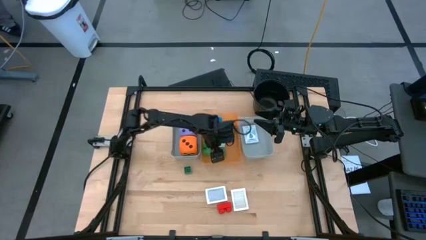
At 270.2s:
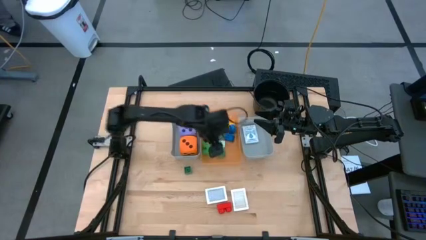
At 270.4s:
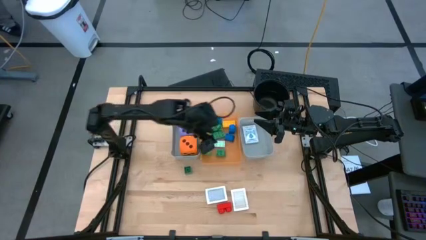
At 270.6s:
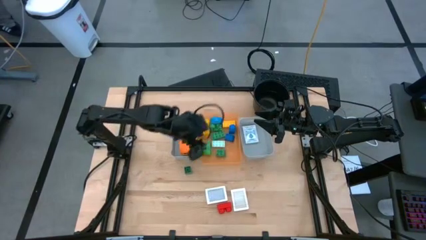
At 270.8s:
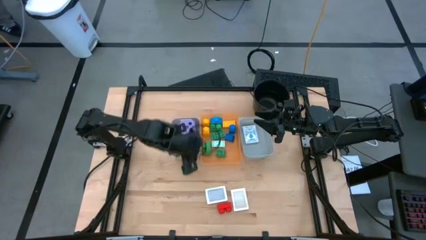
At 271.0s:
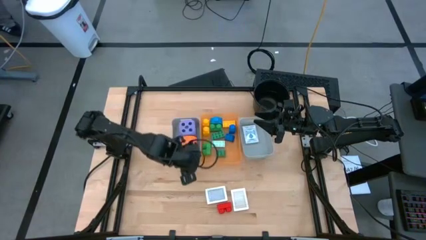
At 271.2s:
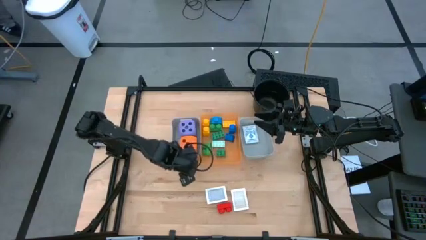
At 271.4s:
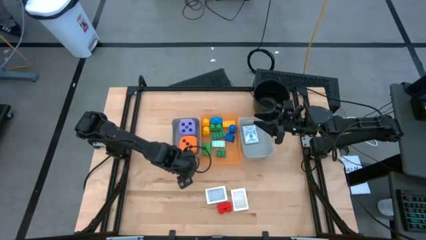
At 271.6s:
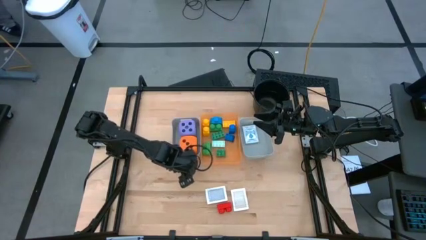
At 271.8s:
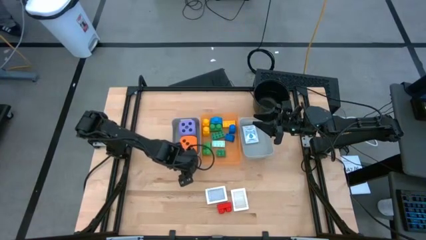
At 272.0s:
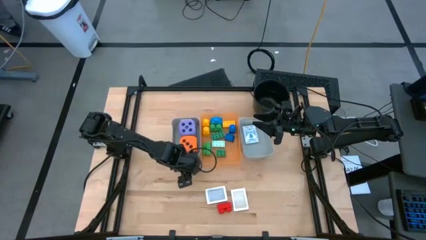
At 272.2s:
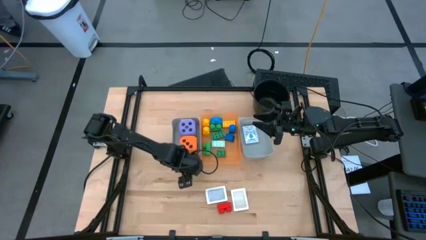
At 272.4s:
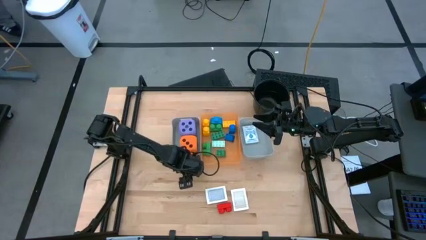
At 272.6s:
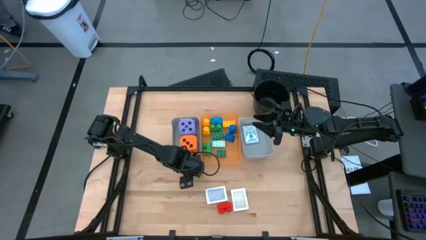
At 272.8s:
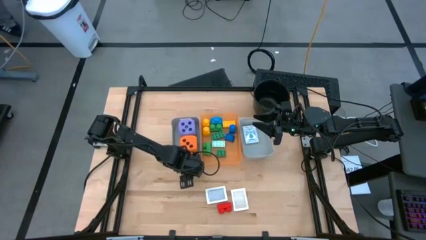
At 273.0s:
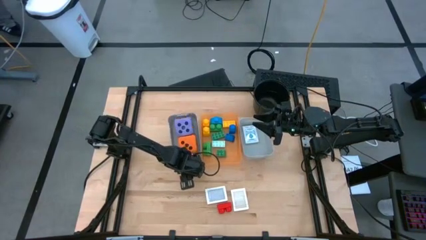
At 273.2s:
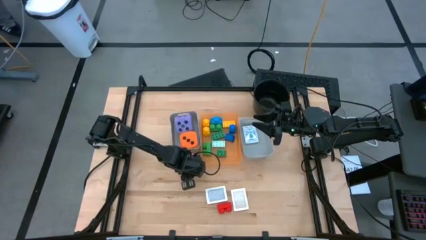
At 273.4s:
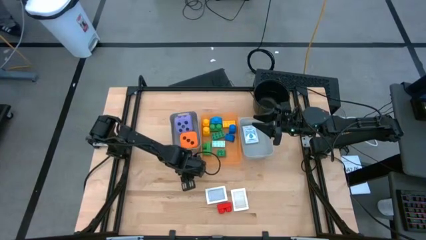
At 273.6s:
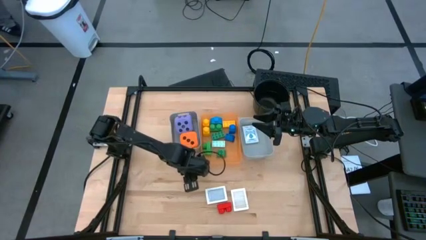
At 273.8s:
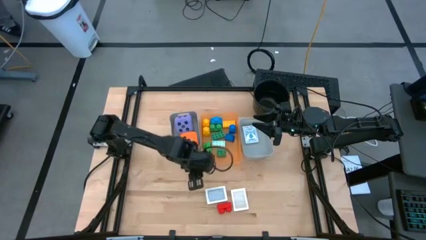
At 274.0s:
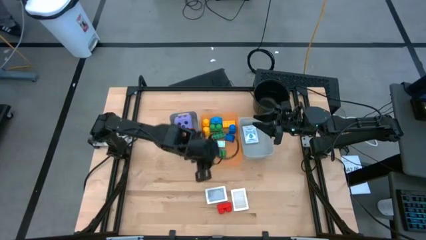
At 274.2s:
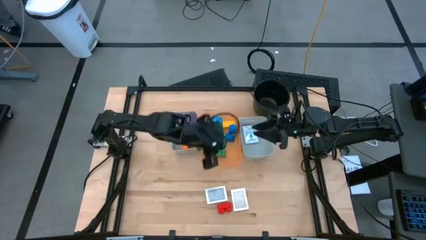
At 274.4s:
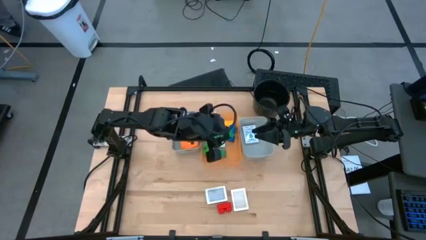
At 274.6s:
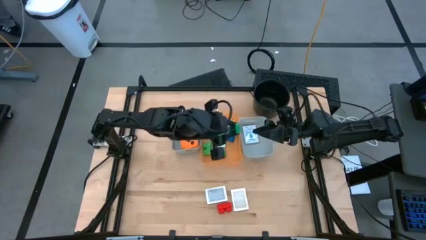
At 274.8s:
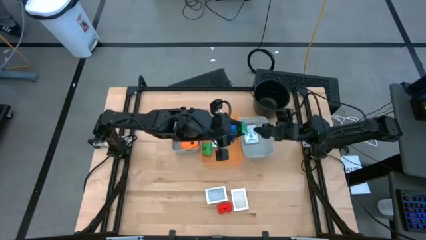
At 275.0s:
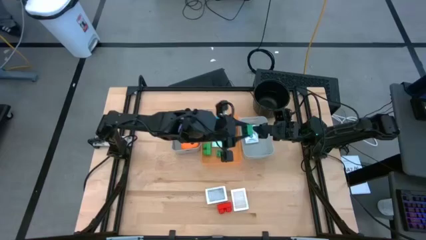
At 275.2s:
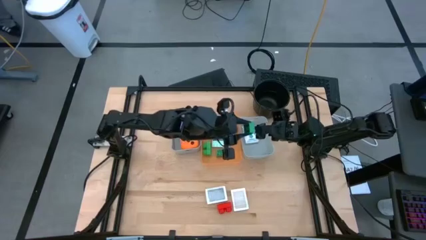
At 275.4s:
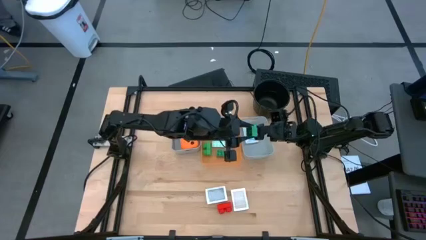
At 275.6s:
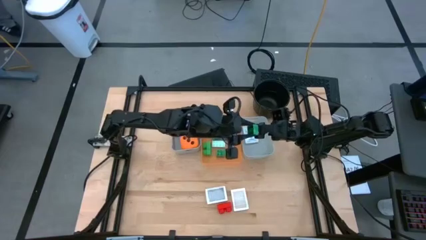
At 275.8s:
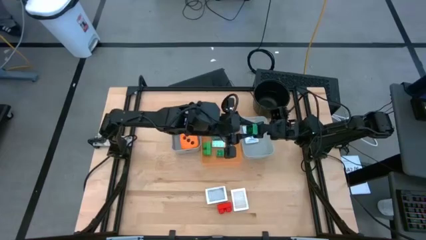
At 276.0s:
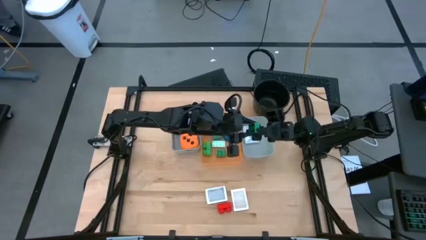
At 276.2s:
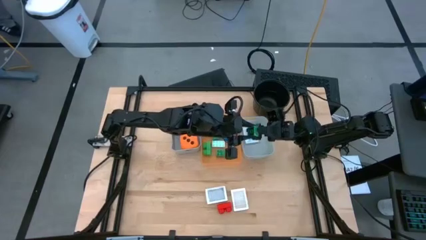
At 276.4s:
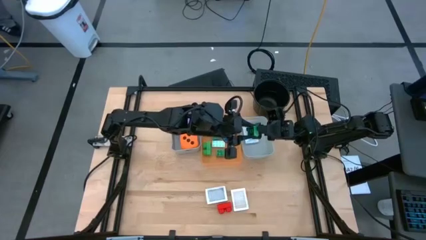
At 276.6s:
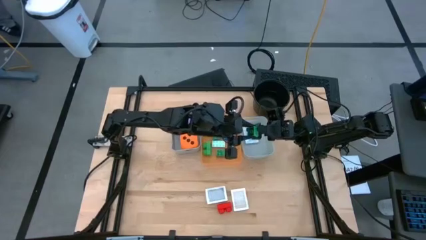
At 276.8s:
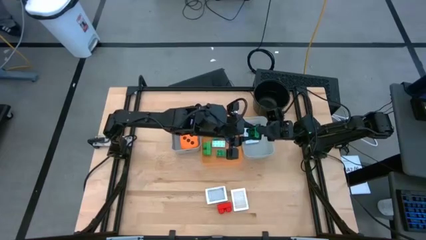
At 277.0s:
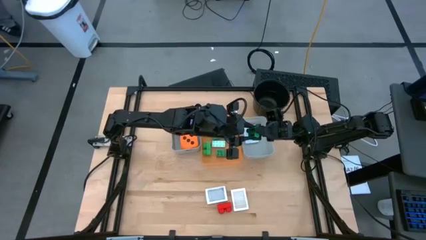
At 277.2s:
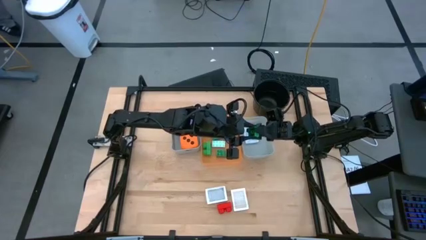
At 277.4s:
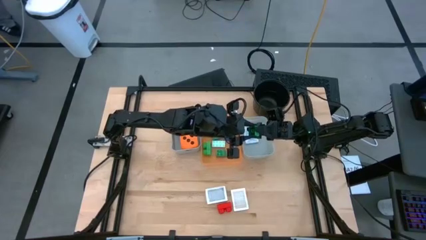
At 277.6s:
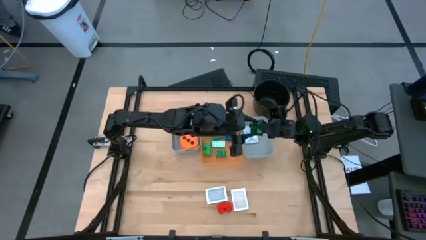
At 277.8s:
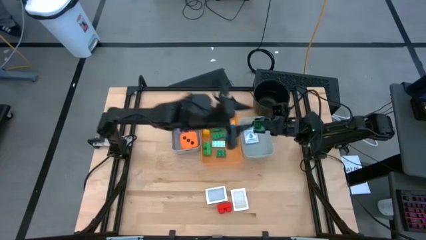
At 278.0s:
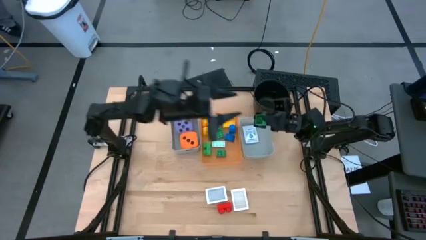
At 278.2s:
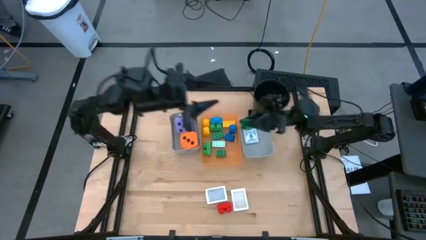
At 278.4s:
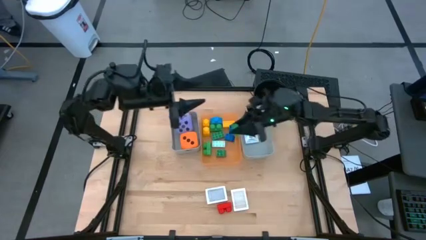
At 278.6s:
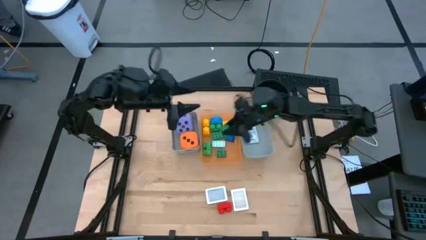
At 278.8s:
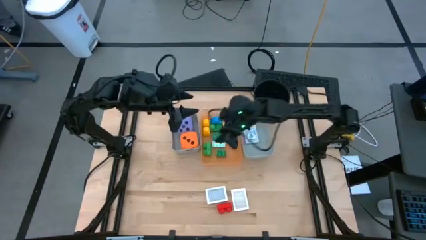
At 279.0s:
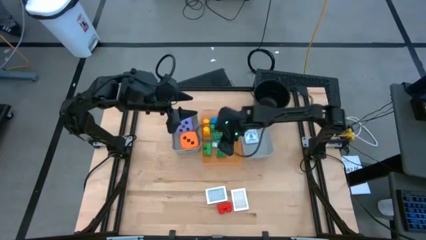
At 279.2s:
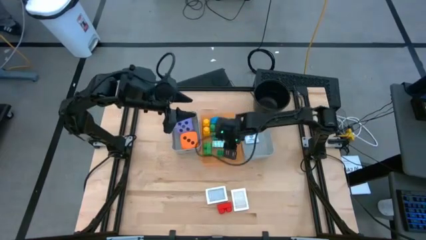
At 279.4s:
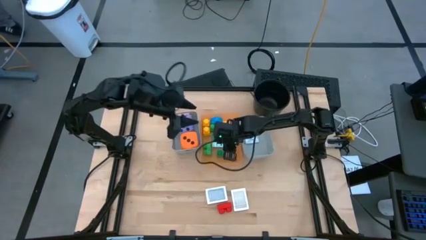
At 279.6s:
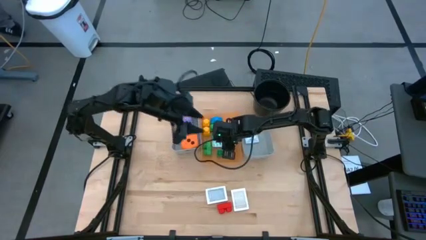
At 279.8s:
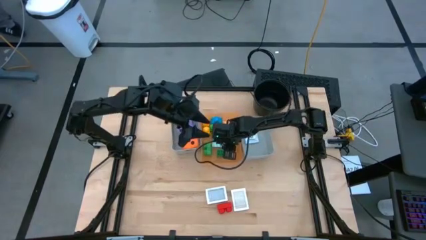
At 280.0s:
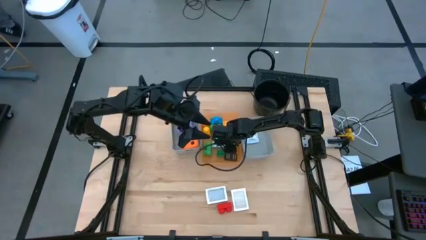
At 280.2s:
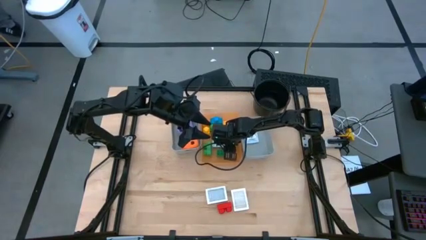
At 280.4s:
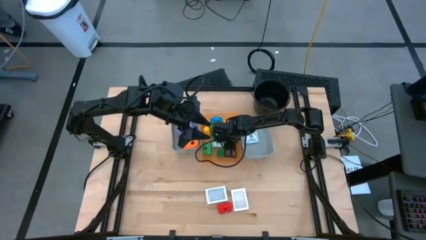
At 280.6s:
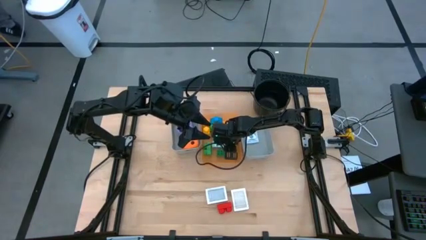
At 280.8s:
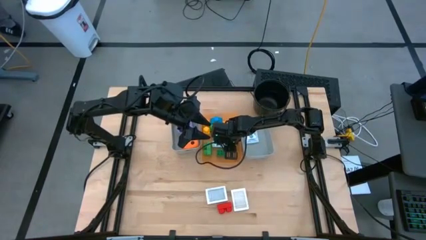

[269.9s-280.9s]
Task: Pick & Place Toys
Put the green game piece into the orange bin

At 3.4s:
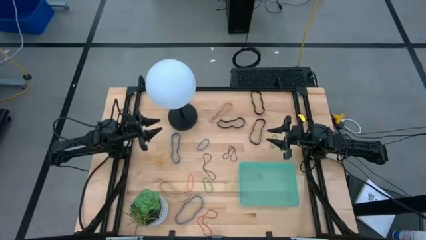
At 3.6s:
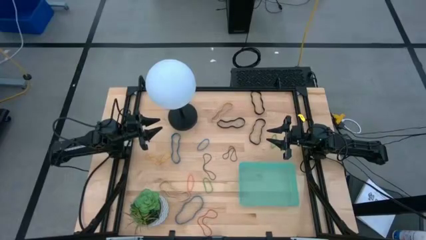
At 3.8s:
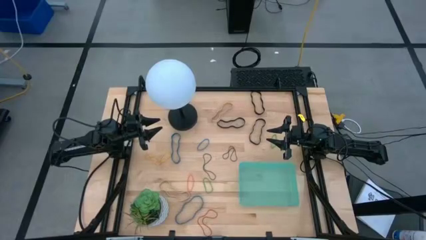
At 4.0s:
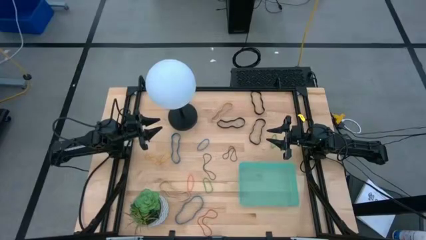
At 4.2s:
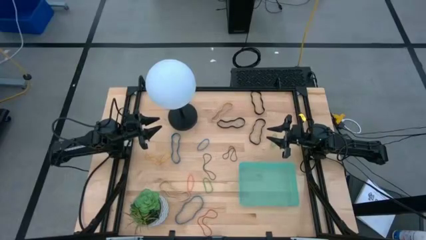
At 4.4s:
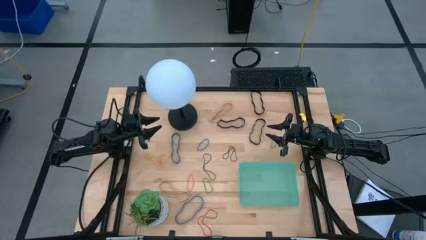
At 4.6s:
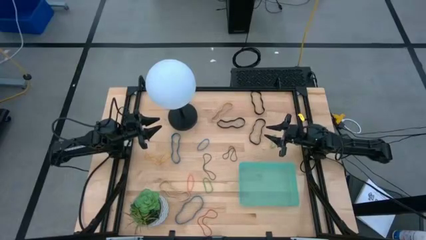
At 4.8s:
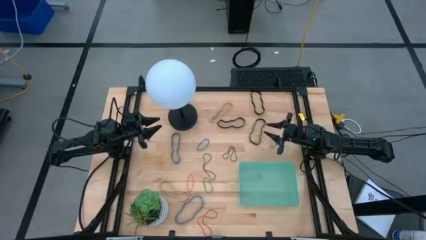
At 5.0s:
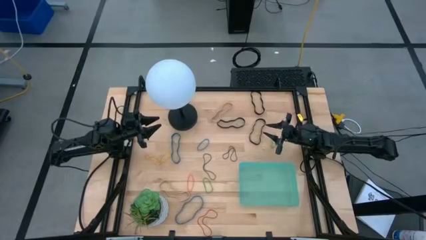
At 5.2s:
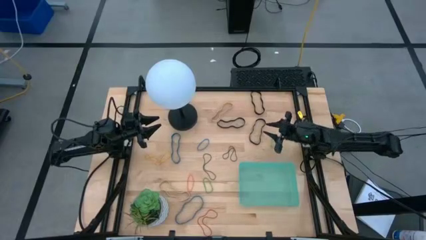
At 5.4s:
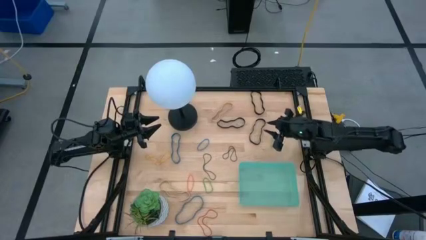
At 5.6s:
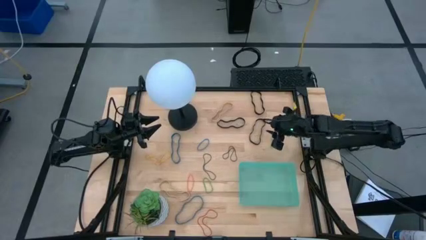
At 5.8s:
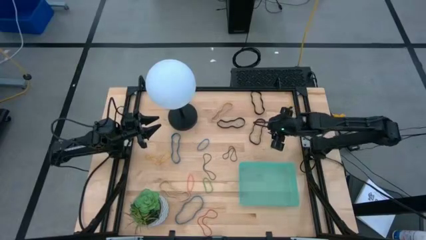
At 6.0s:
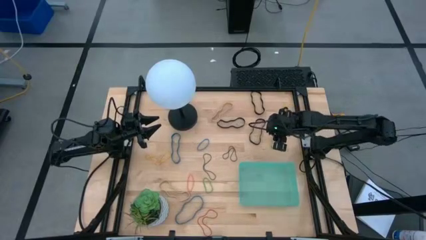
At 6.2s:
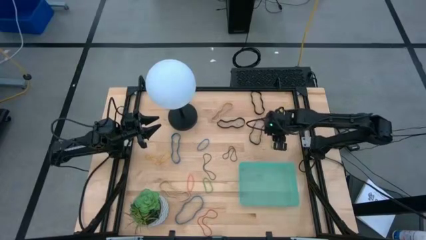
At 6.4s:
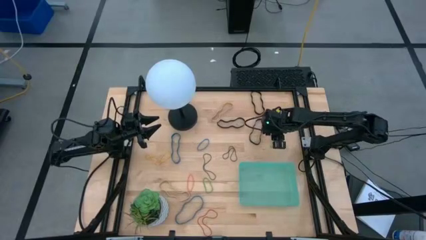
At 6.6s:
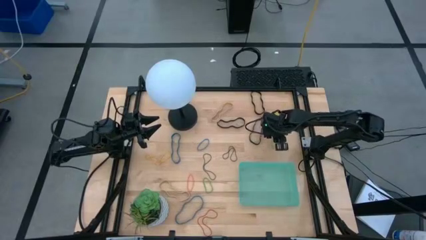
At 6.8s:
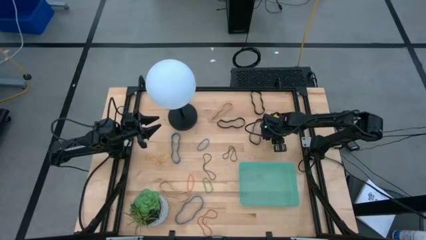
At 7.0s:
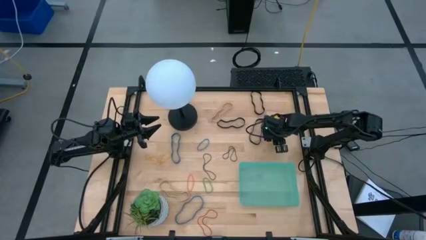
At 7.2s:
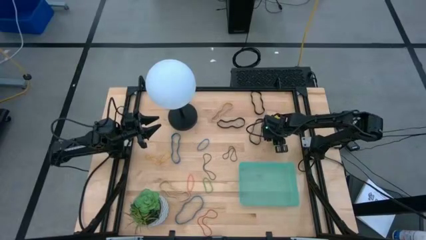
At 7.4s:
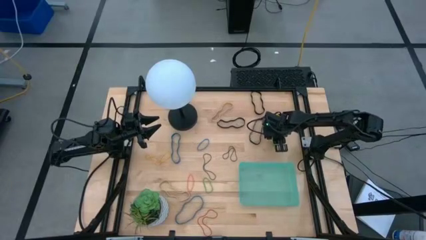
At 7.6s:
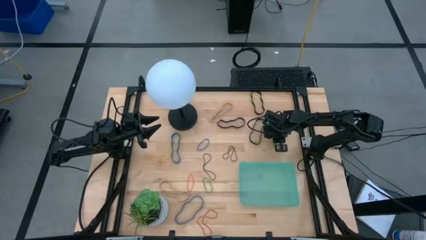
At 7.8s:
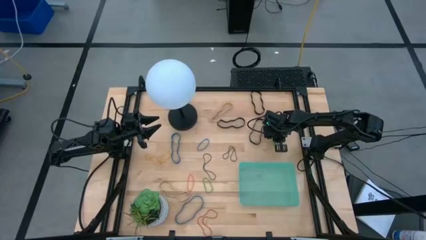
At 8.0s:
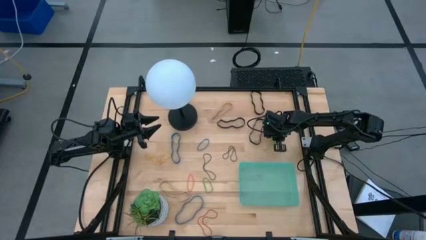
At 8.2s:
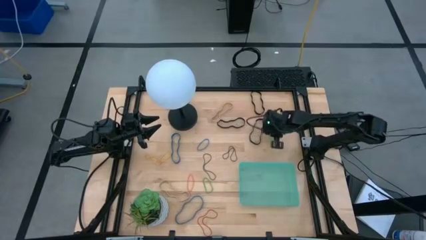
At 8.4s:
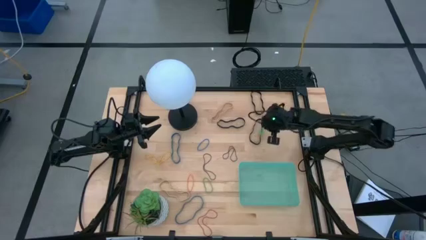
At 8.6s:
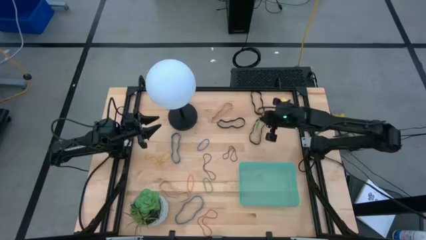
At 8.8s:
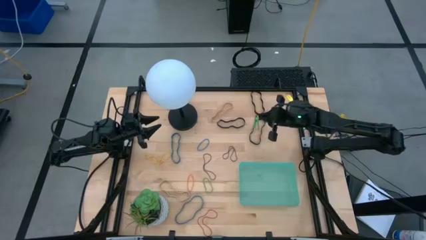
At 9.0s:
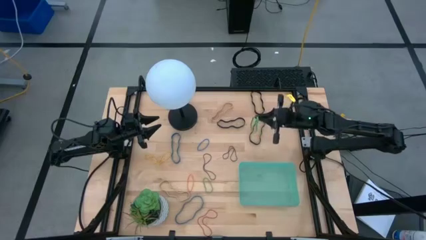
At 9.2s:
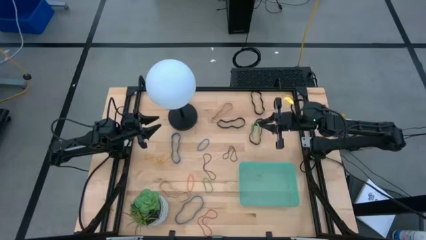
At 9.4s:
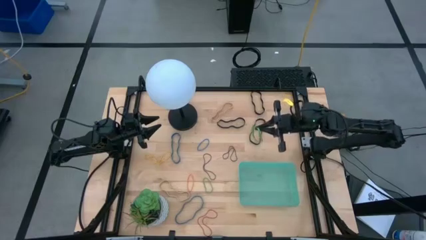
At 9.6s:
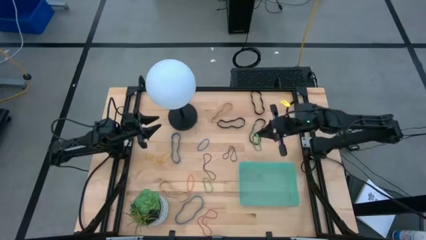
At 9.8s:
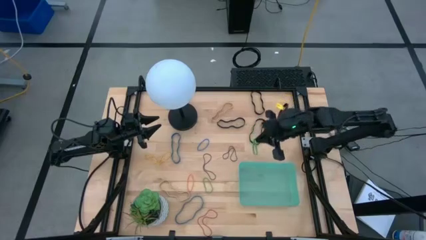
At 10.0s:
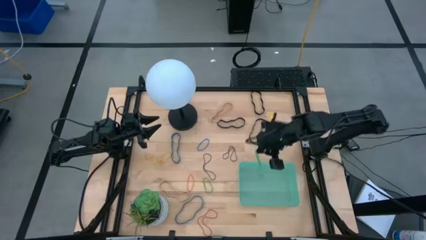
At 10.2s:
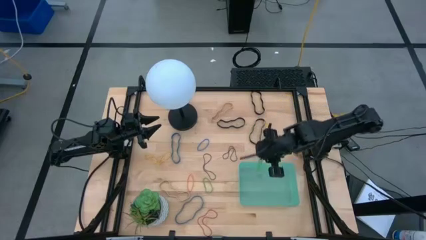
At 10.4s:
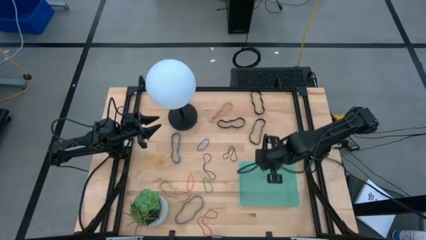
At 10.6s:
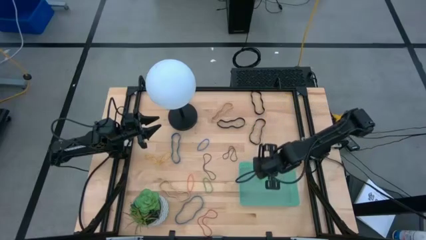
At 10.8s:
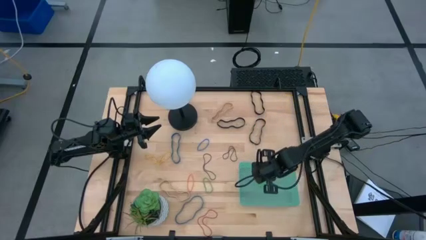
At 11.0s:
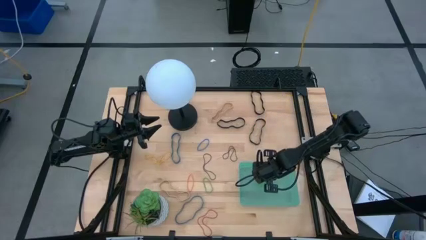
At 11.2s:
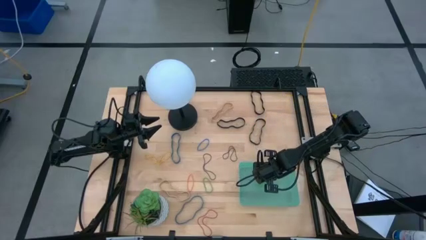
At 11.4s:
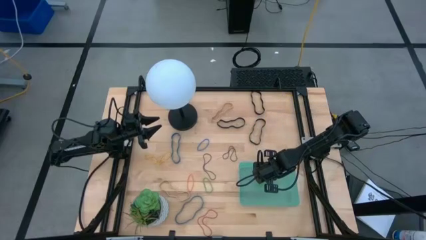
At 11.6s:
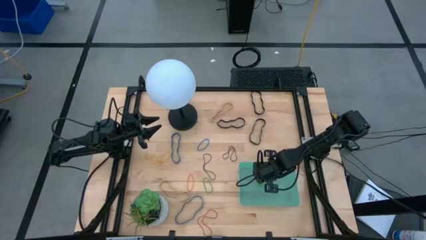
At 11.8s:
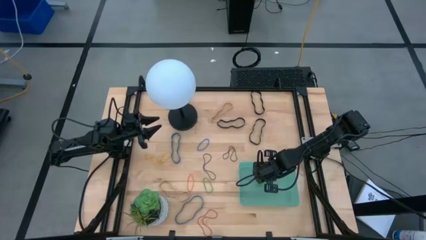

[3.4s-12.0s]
Task: Pick and place rubber bands into bin
Put the top green rubber band into the green bin
